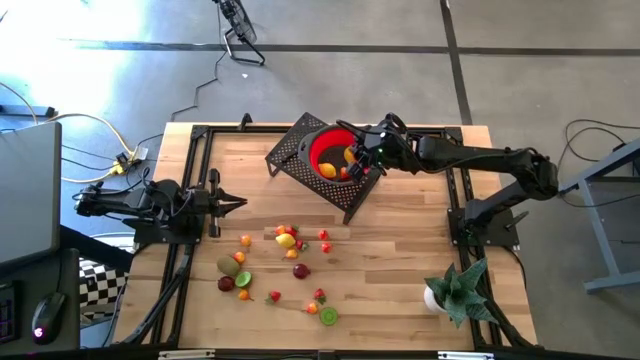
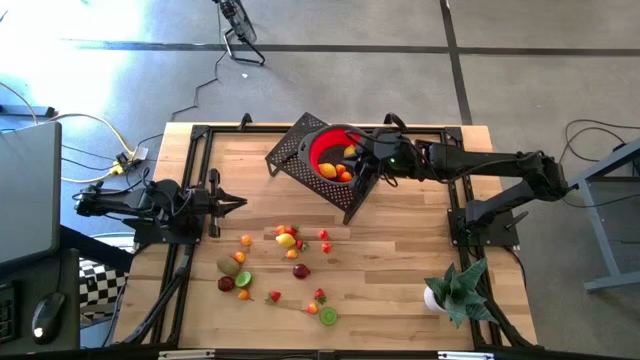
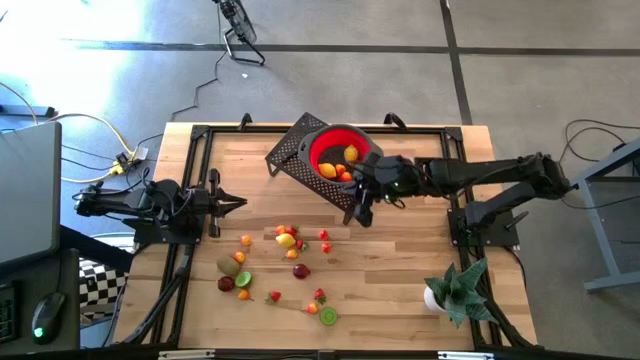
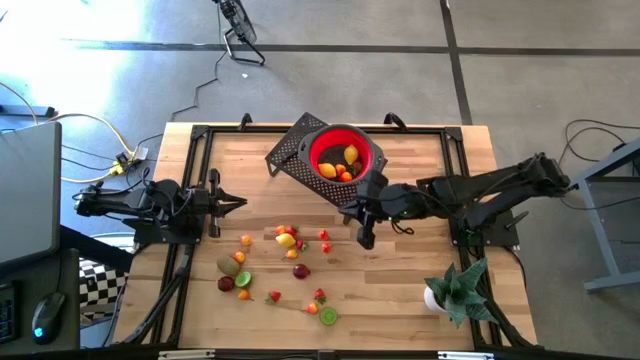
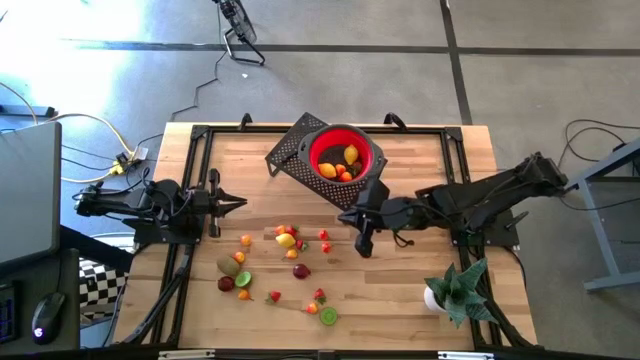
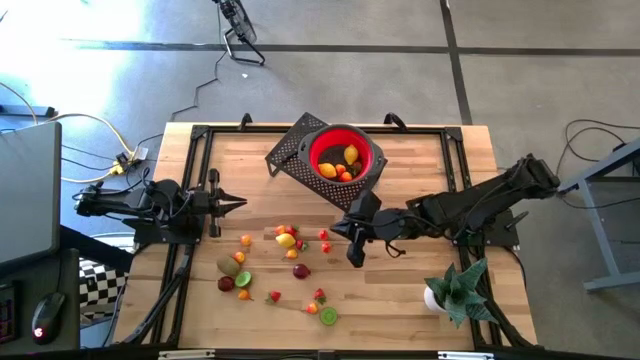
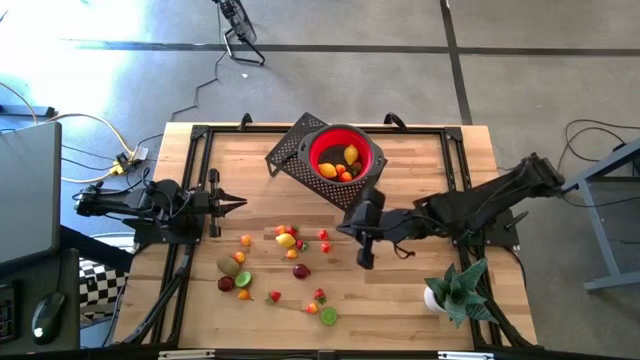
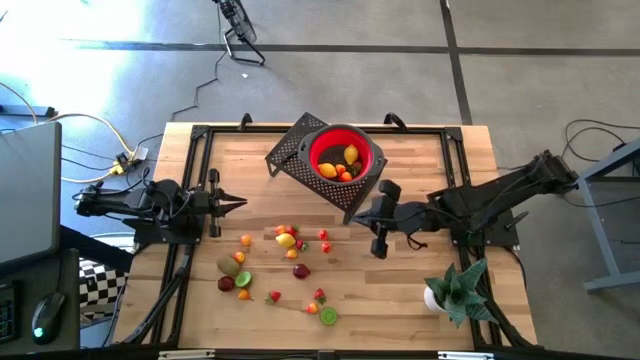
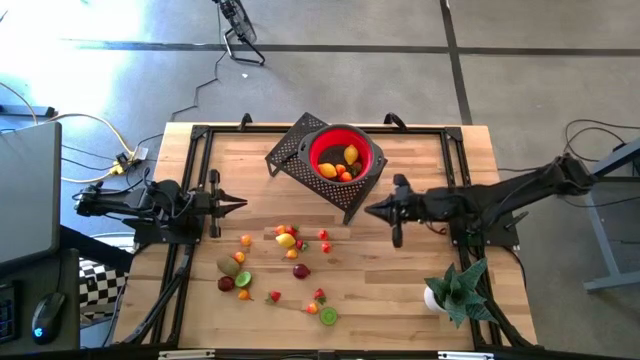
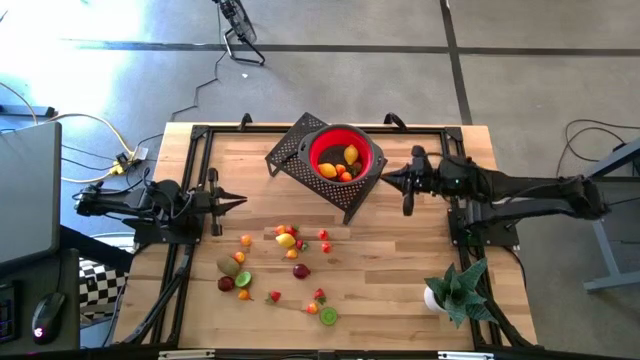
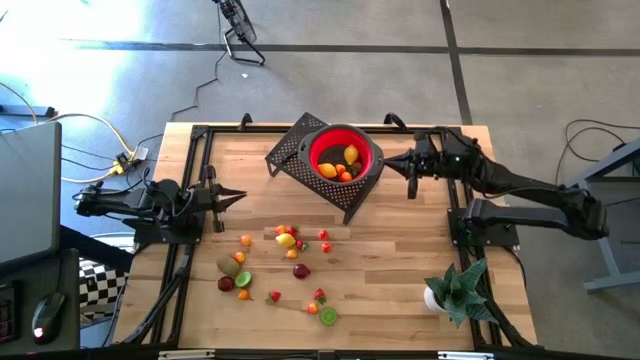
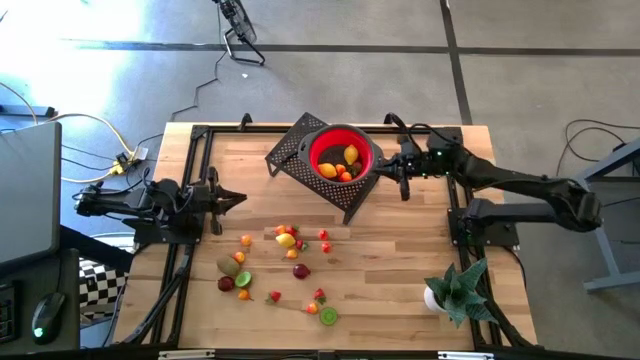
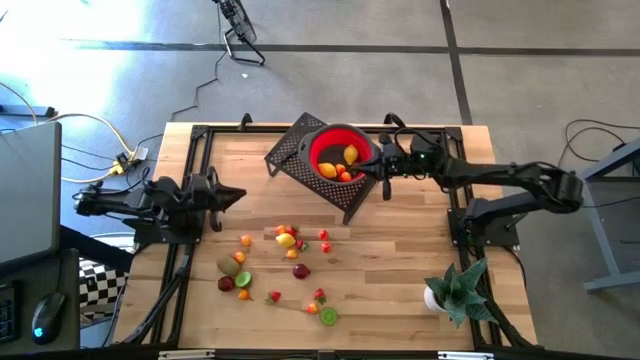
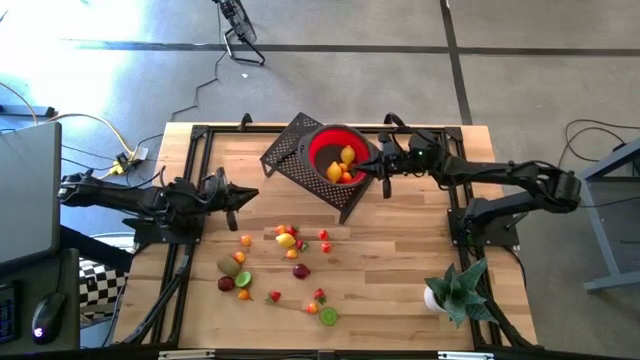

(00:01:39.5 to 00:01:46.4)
Task: Pick & Place Fruit
Adjust the strainer bowl on the shelf

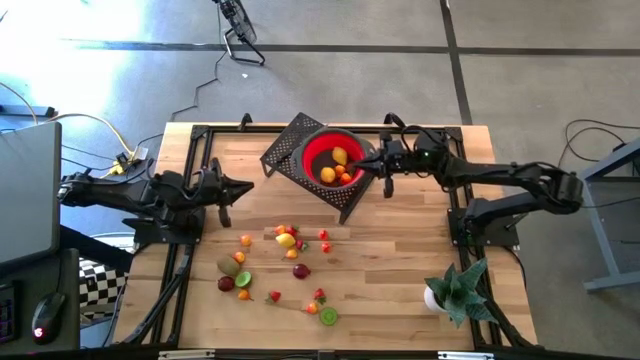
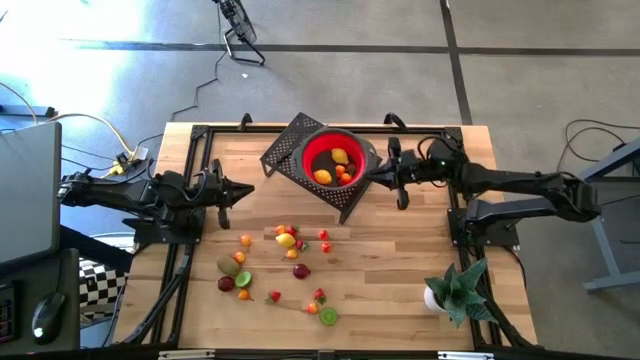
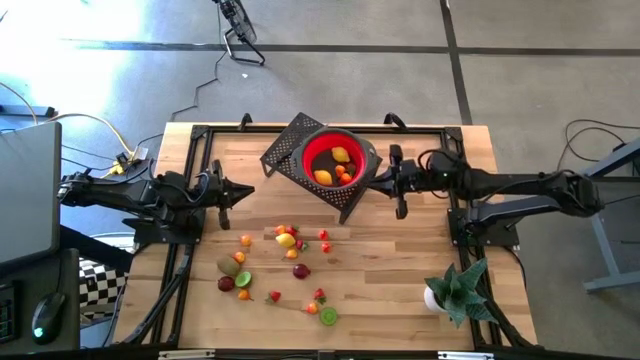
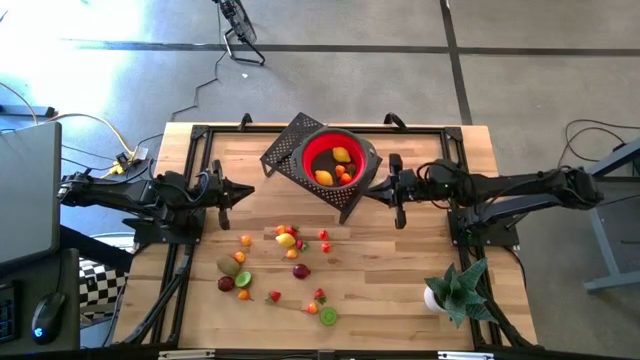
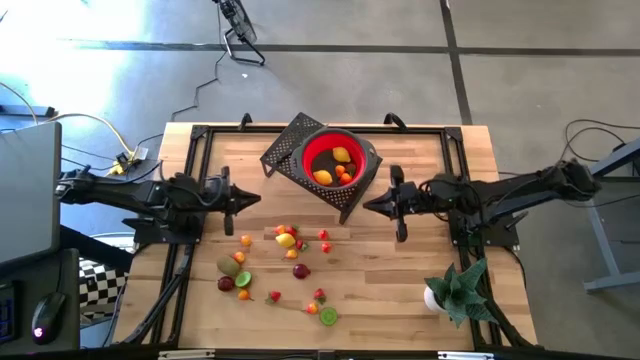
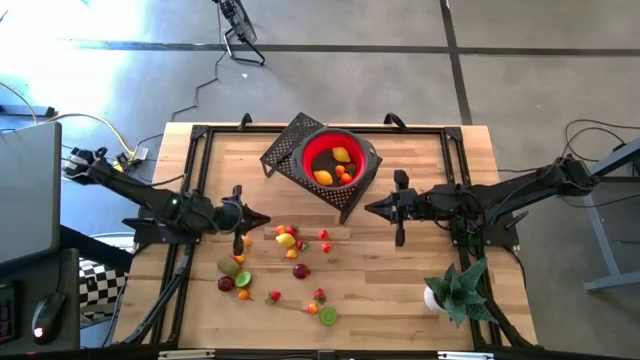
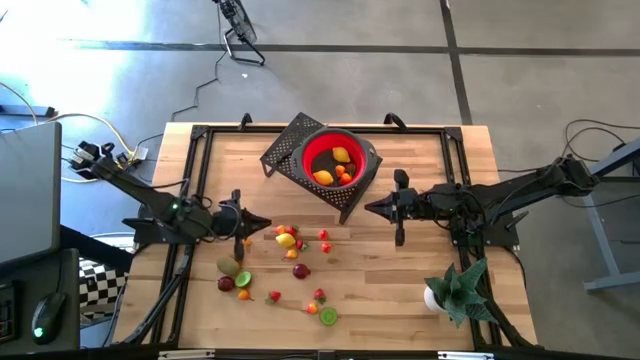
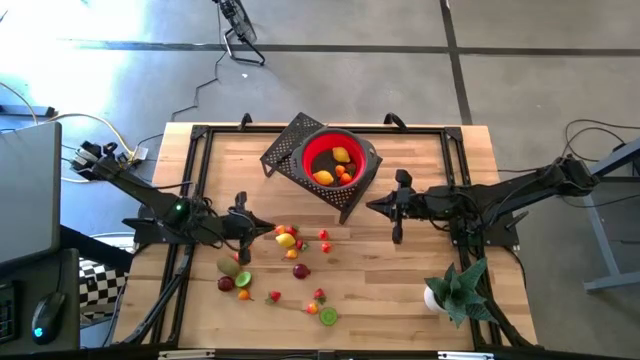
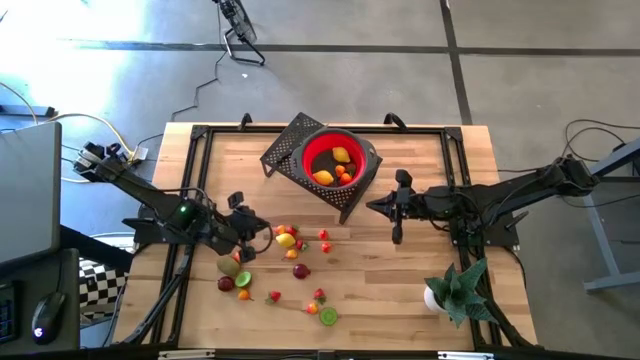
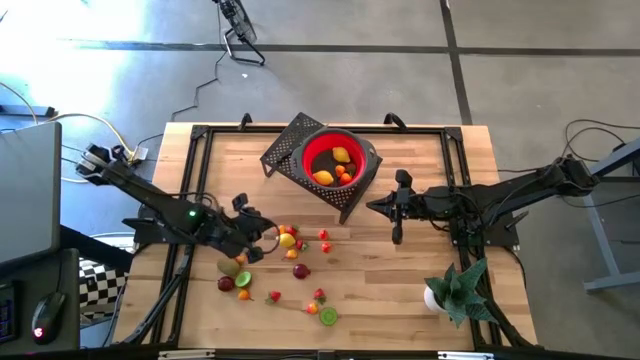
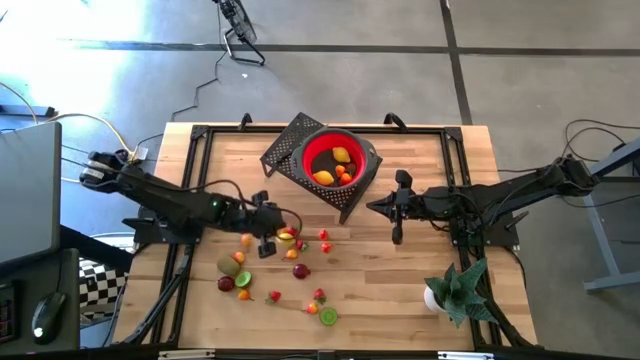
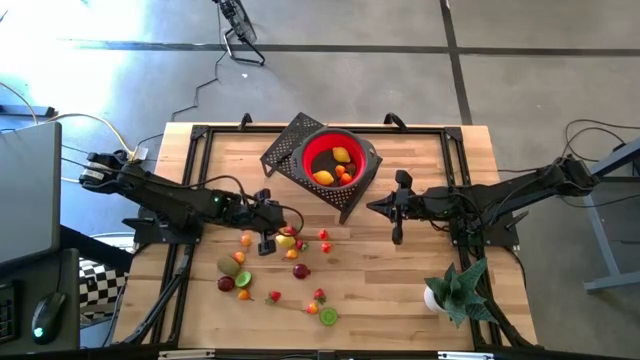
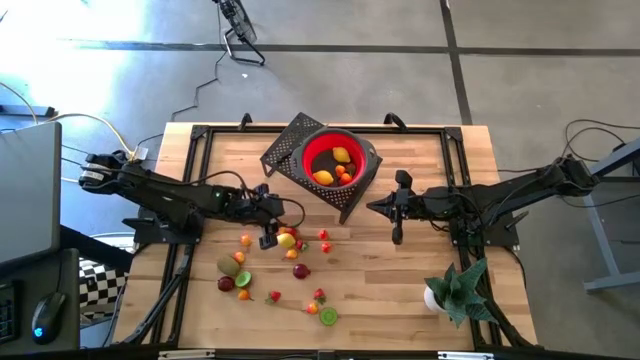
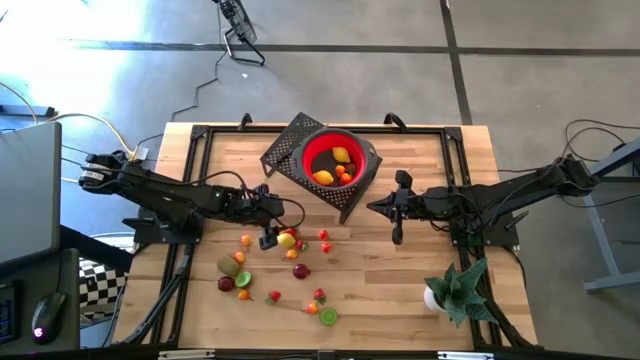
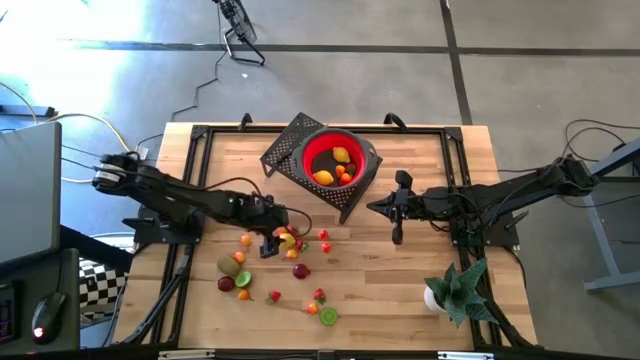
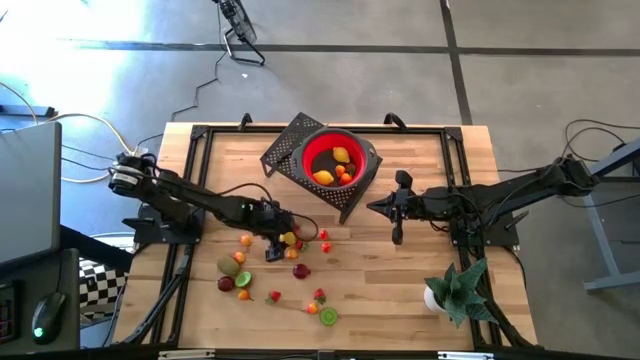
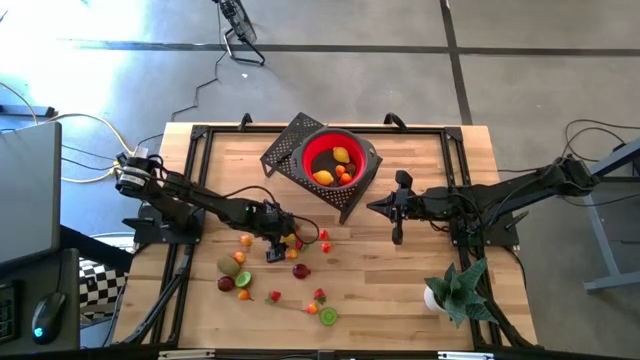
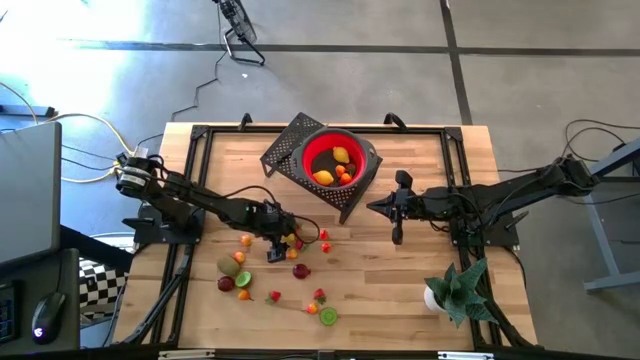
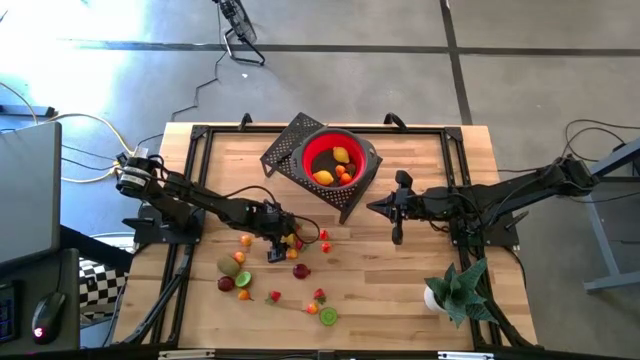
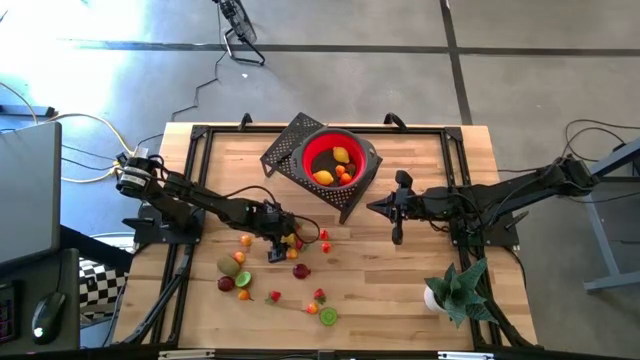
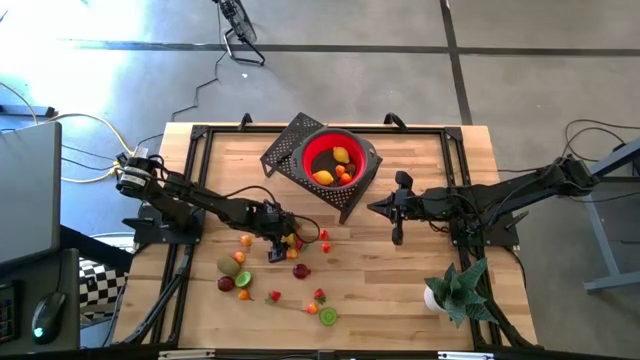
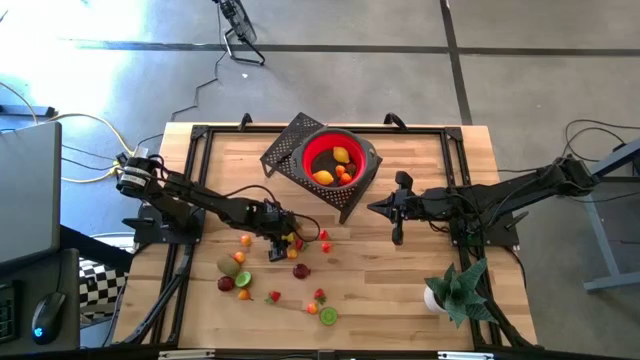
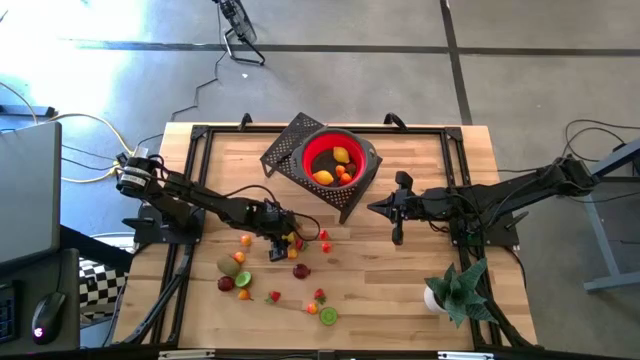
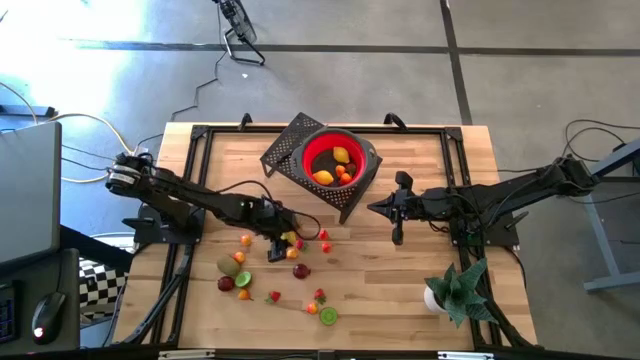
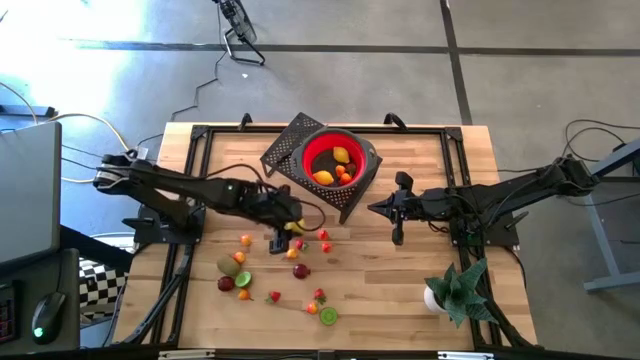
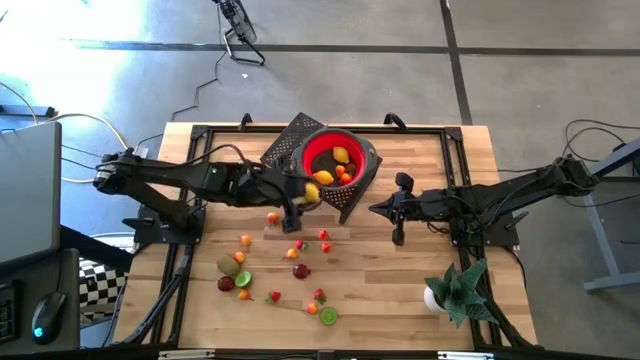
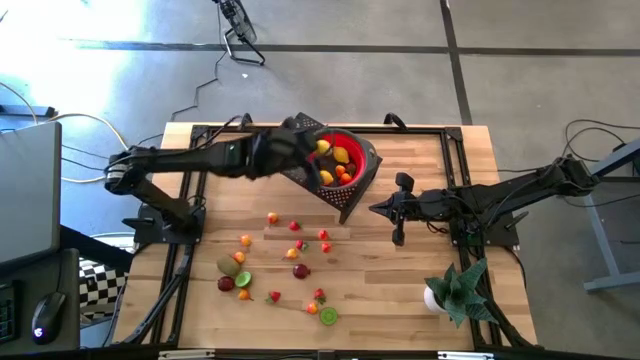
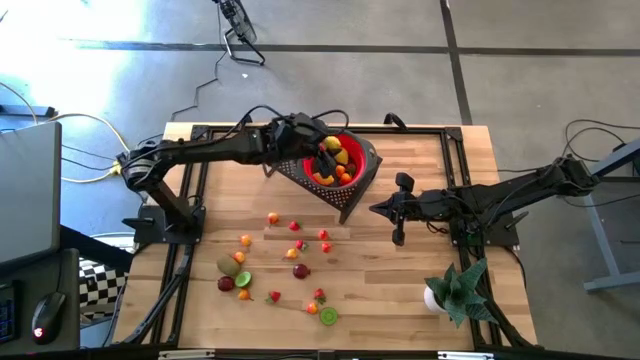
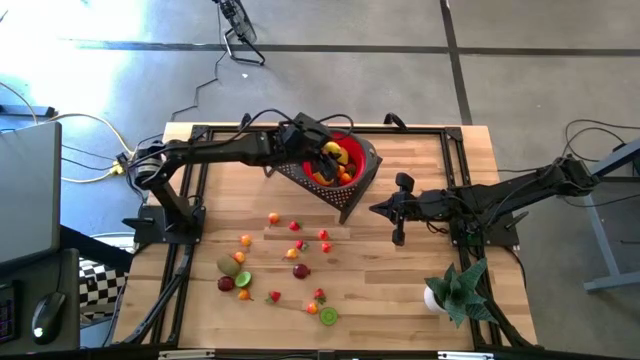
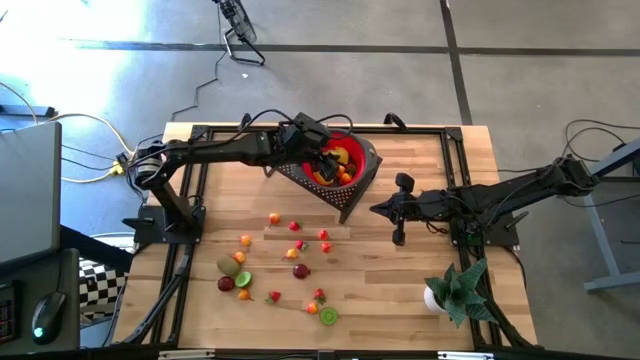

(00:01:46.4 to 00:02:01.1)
Put the lemon into the strainer bowl on the shelf
